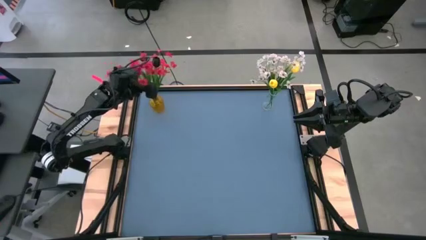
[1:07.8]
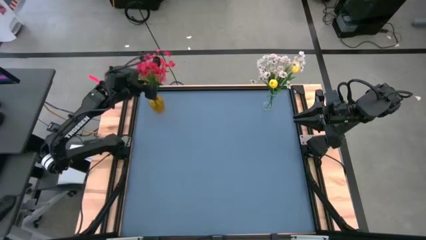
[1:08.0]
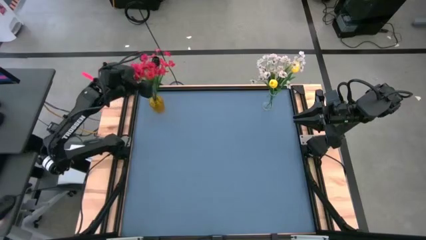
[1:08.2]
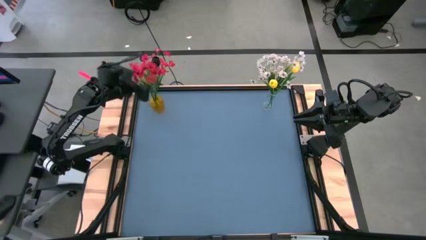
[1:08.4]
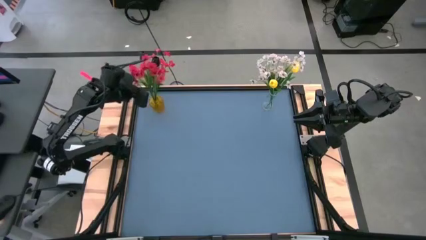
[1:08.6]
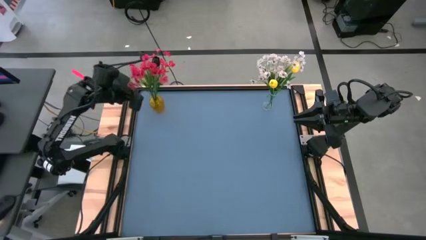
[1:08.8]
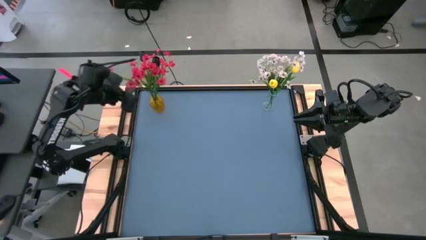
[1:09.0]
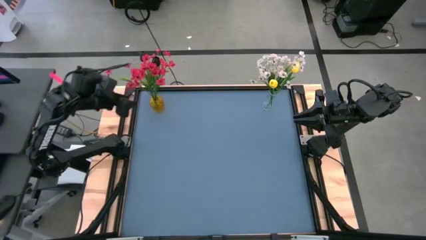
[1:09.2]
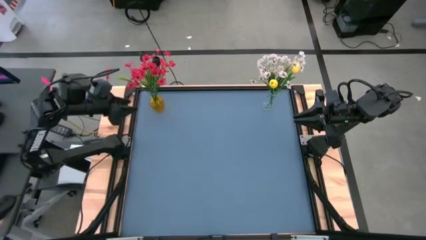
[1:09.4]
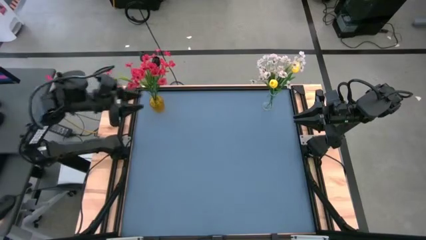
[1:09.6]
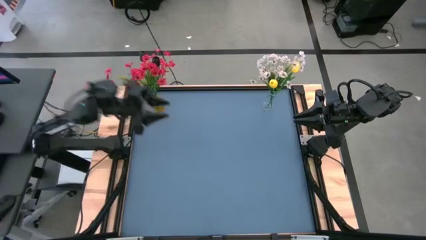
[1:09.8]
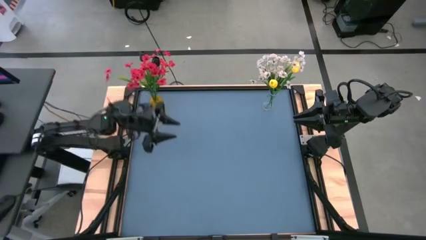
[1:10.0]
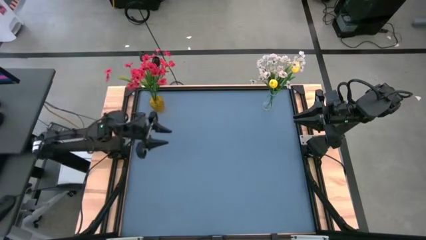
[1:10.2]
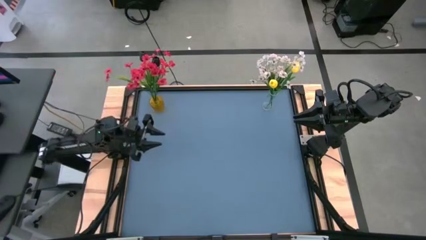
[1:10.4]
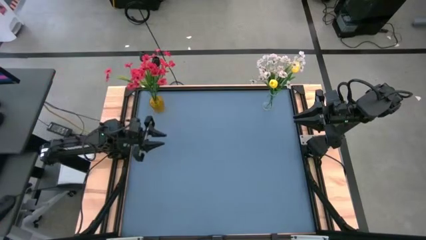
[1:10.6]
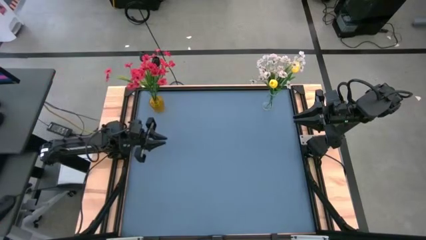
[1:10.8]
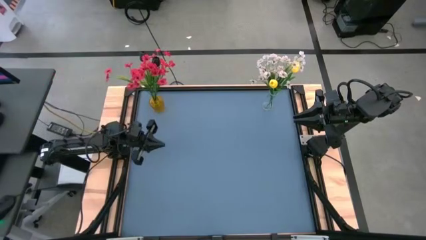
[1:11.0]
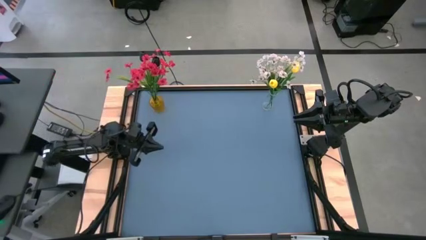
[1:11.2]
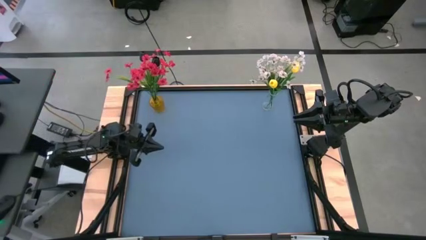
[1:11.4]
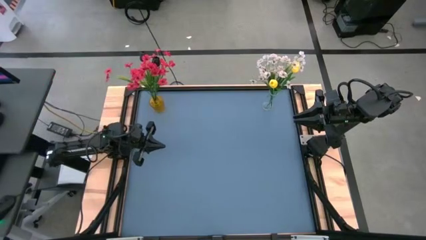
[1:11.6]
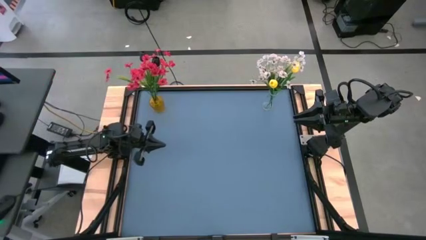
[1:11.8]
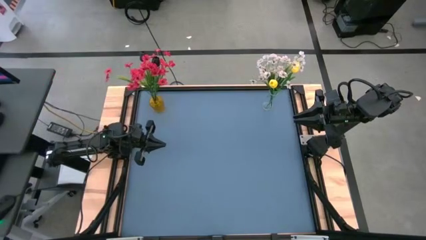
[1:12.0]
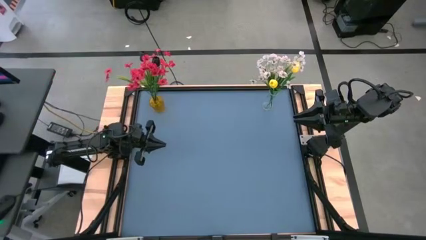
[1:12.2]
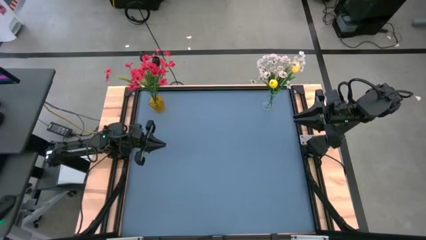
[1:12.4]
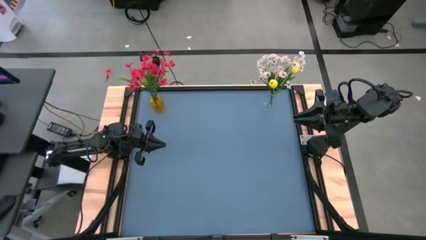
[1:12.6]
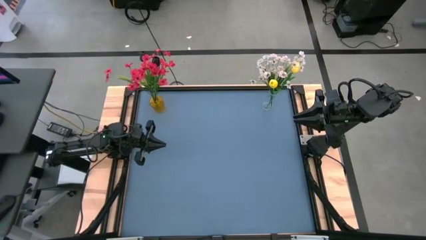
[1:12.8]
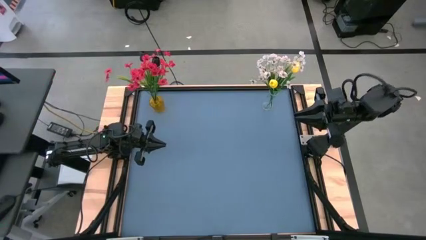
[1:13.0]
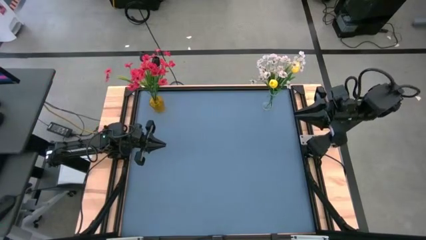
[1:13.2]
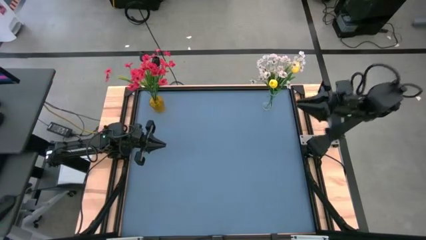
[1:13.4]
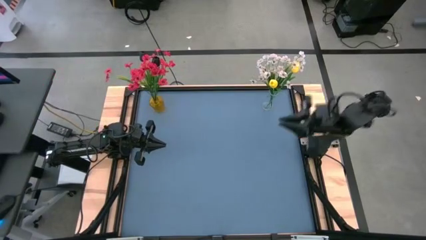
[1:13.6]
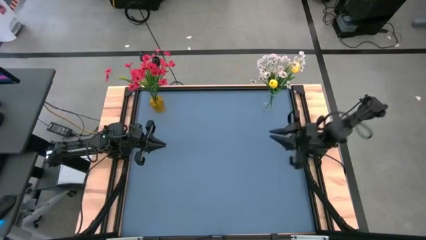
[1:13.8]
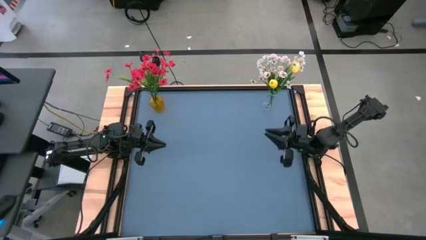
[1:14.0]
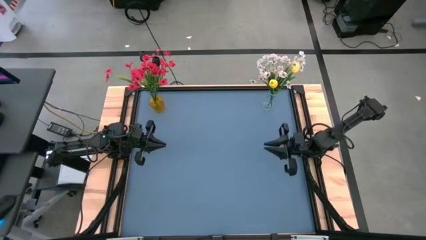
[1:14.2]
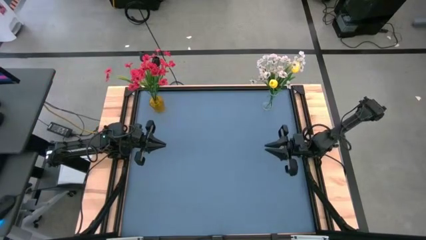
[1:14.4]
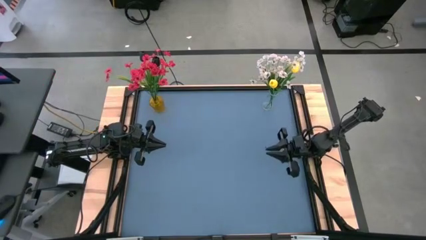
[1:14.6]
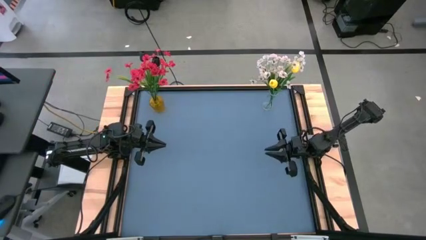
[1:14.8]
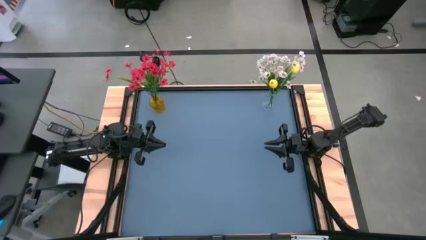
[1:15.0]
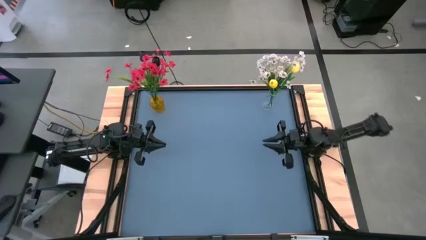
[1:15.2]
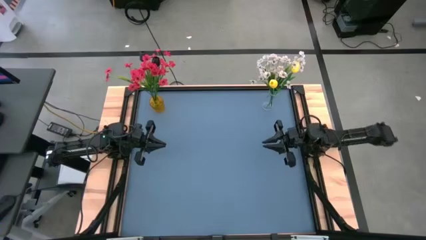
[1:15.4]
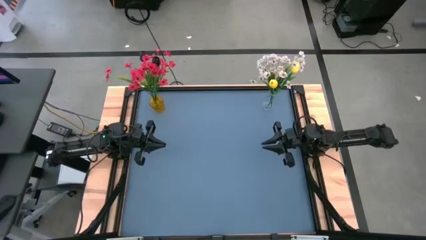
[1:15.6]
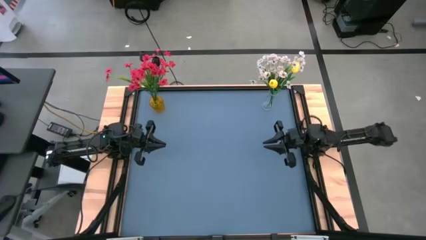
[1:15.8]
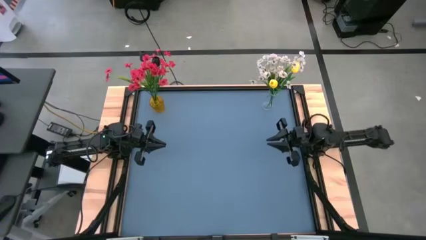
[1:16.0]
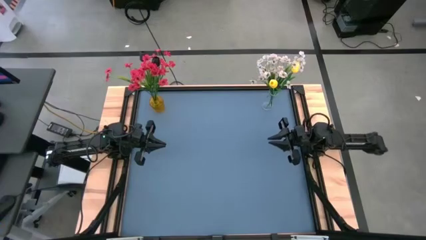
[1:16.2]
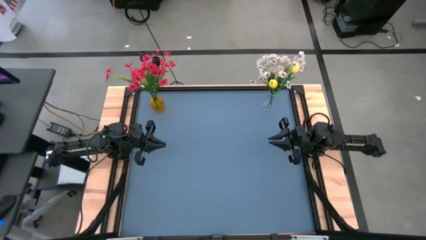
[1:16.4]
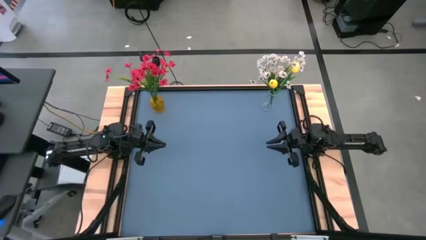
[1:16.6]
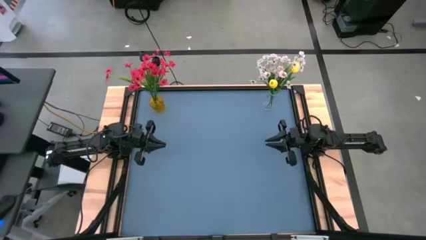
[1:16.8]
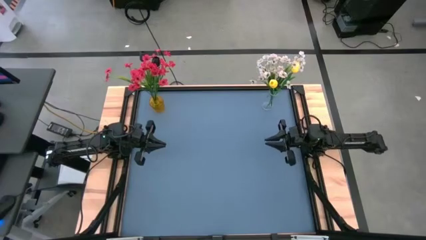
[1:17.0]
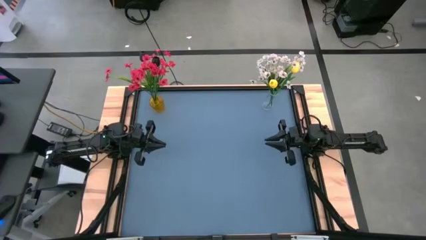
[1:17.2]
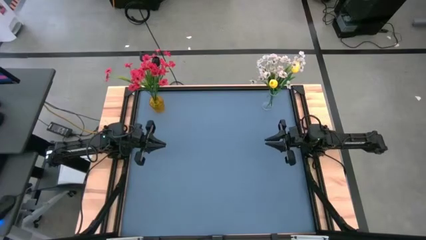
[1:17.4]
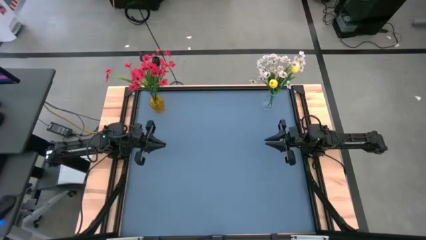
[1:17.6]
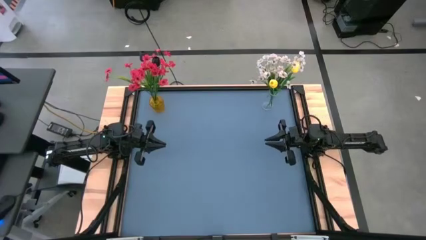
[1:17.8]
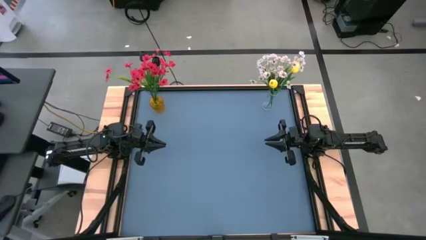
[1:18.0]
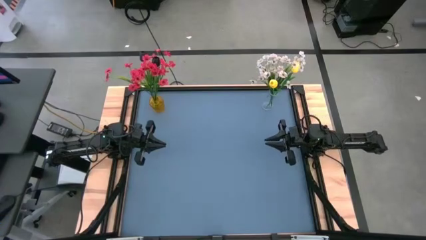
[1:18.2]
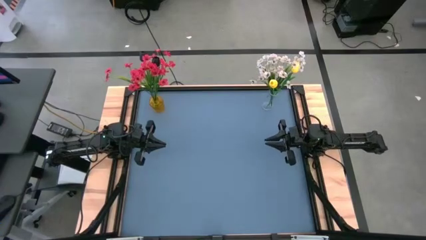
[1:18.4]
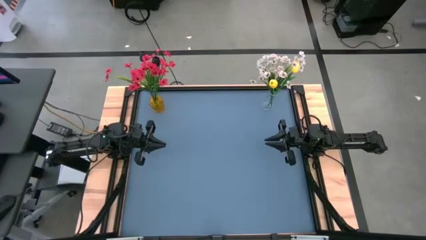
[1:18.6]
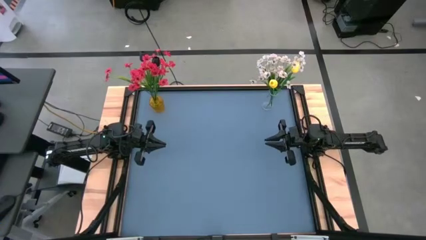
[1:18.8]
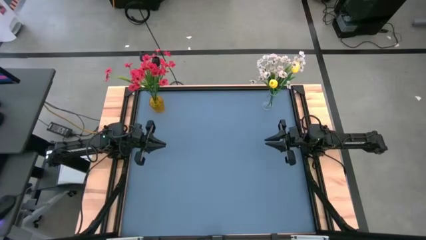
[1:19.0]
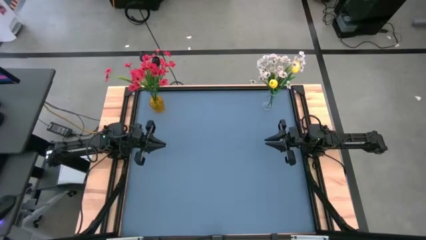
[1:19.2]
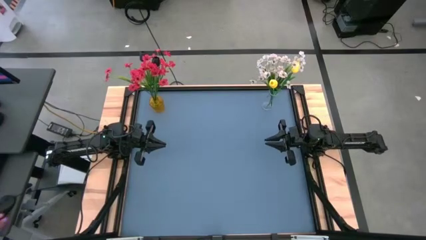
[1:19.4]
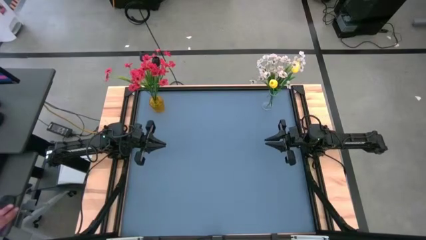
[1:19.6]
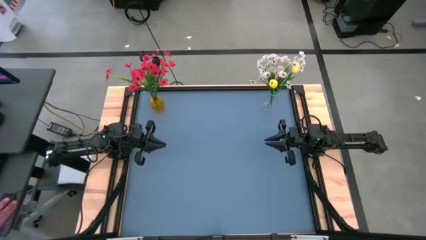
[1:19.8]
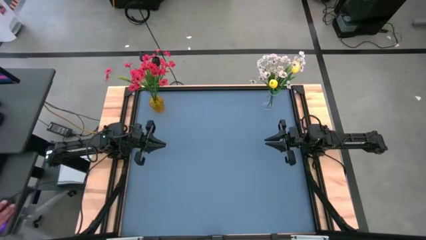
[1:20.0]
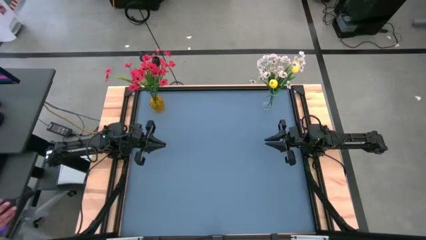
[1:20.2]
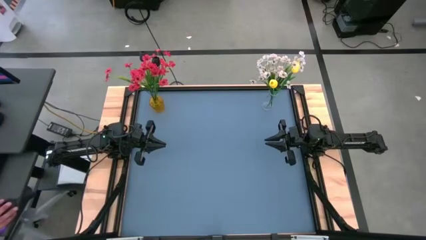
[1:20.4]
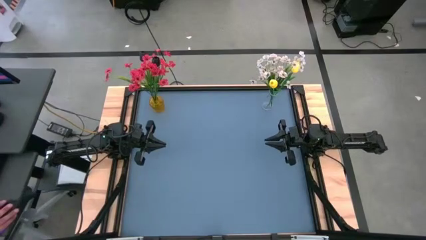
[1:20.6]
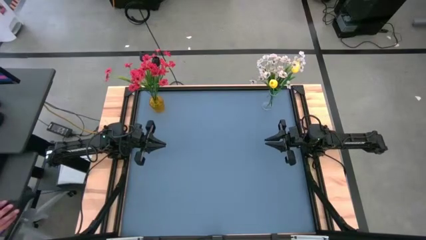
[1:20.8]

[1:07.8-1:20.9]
Task: Sort flowers into vase by color
Return to Home Position

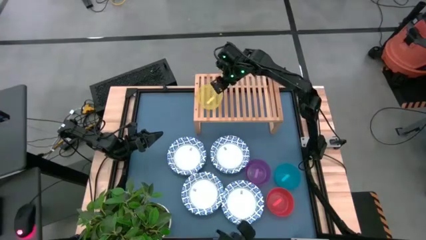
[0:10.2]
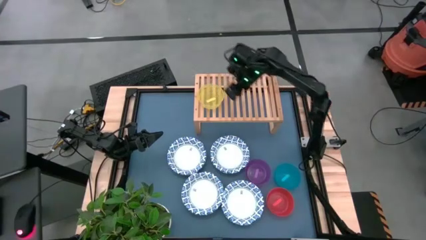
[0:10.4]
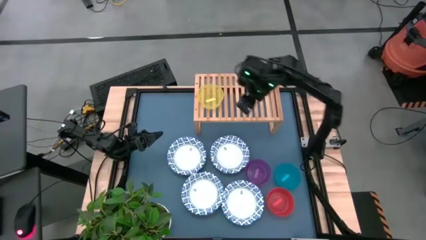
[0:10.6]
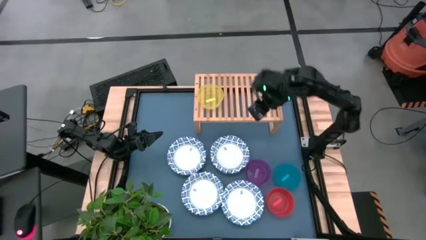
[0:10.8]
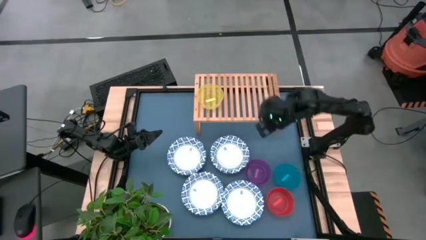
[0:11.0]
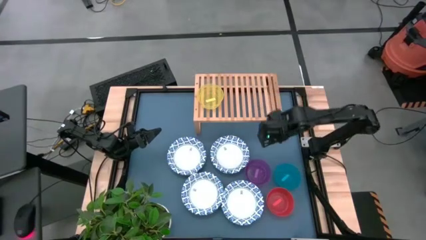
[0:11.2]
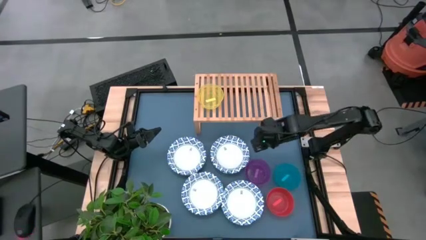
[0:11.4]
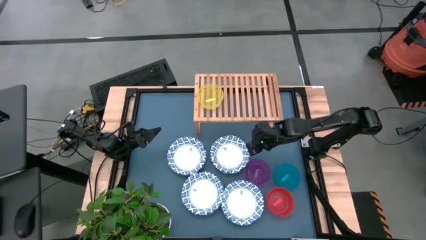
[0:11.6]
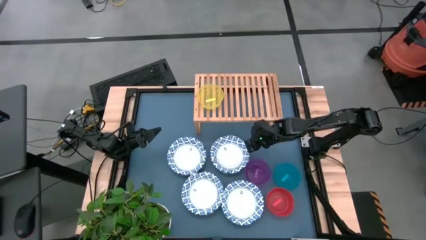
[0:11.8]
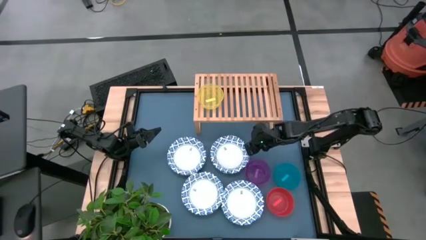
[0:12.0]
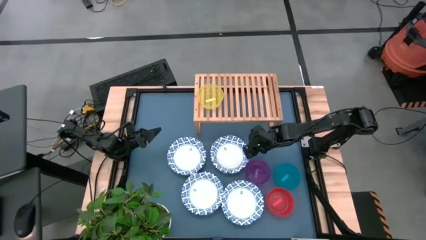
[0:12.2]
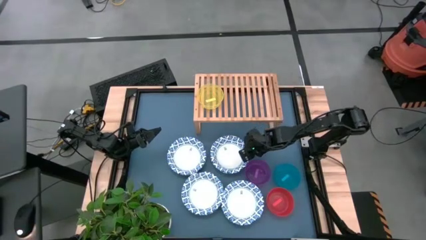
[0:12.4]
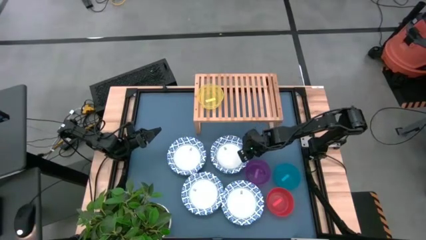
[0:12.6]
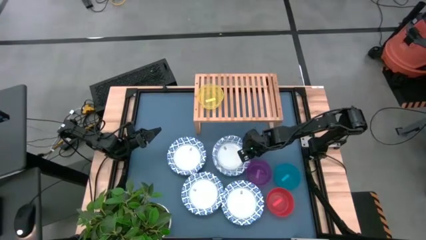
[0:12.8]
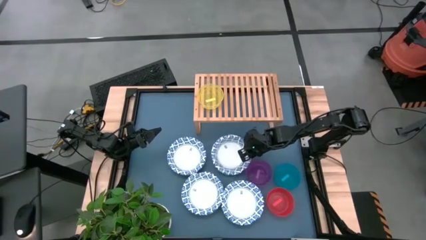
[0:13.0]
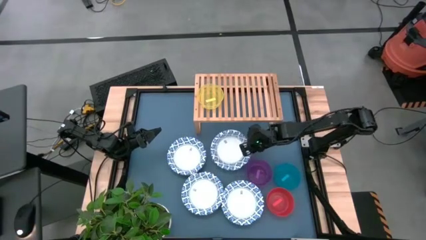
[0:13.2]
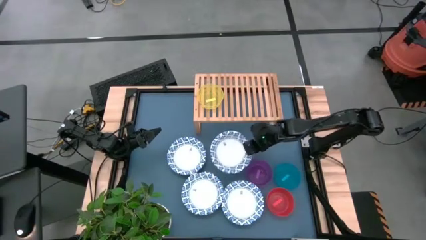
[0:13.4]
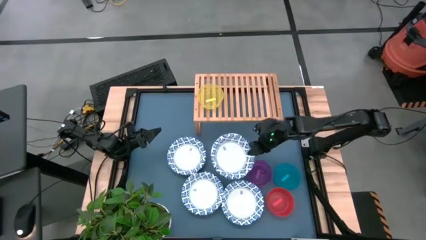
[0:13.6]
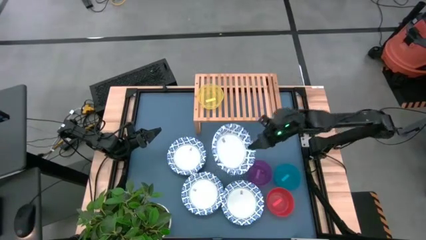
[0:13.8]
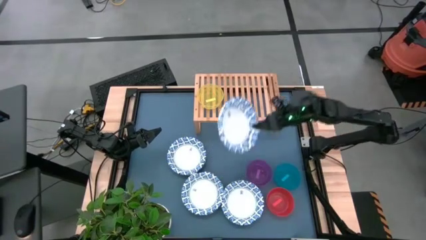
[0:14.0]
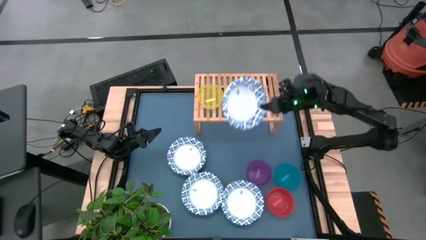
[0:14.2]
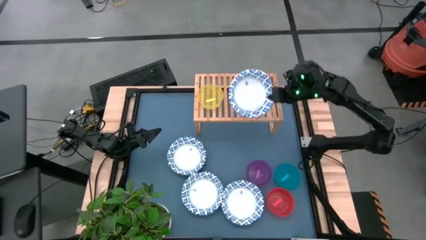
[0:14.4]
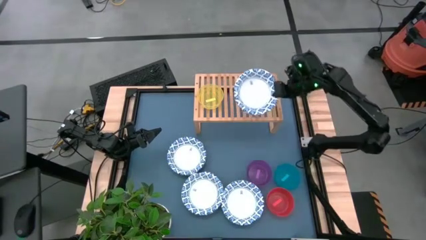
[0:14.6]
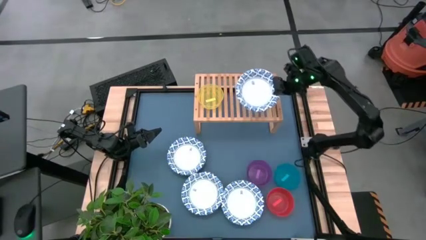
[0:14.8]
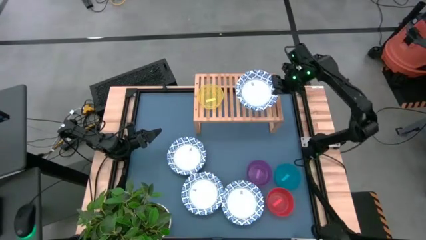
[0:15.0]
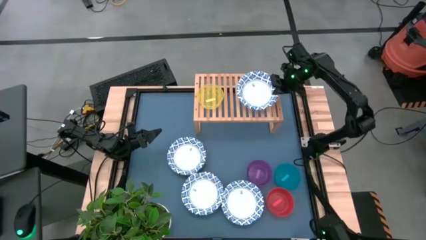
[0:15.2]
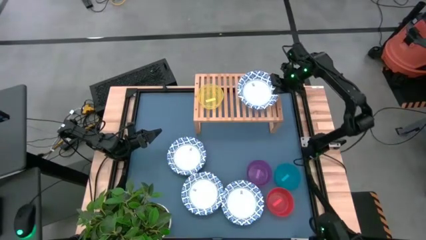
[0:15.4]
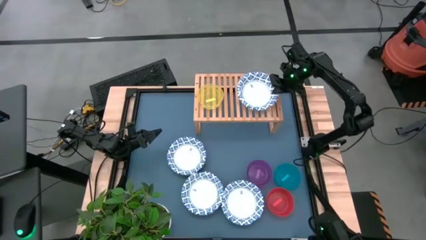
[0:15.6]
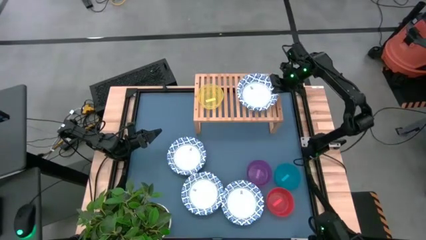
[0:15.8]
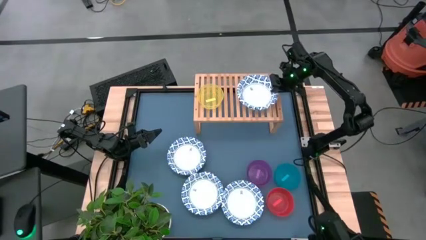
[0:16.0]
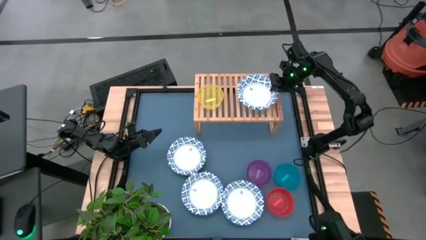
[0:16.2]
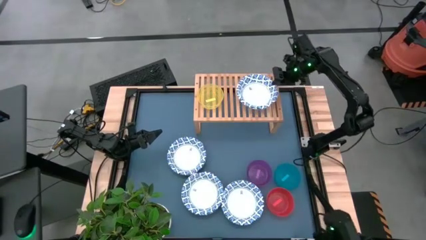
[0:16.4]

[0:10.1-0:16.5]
Task: Place and stack bowls onto a shelf
Put the top right white bowl on the shelf
